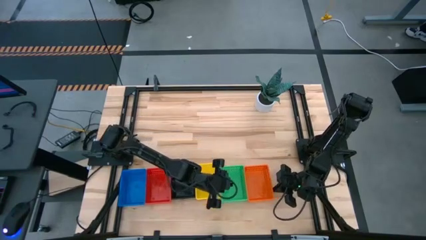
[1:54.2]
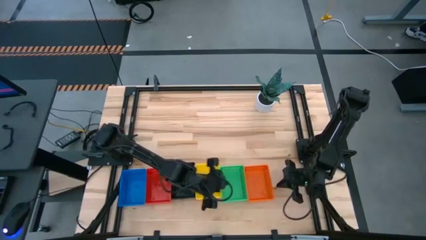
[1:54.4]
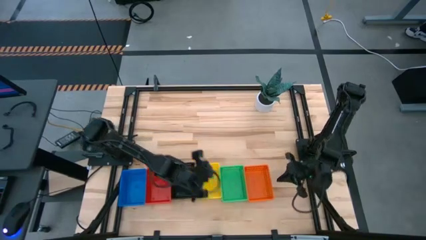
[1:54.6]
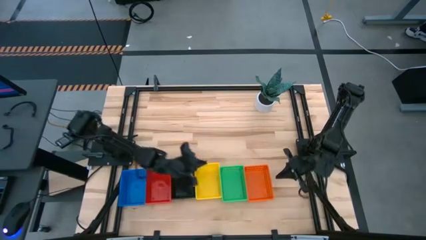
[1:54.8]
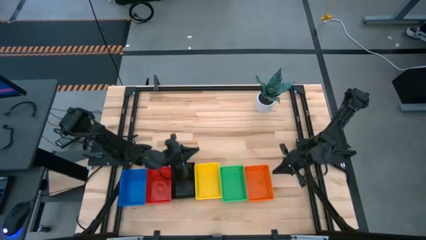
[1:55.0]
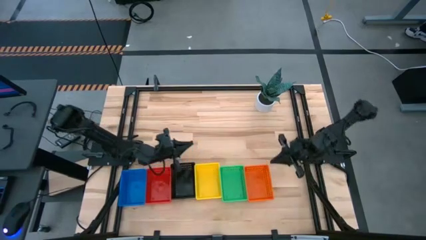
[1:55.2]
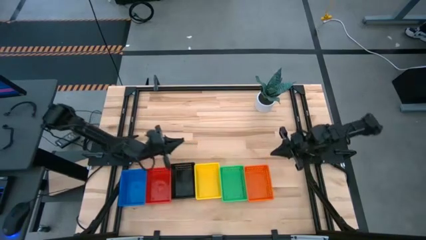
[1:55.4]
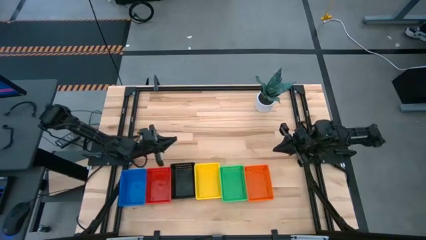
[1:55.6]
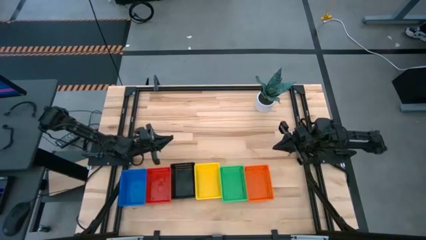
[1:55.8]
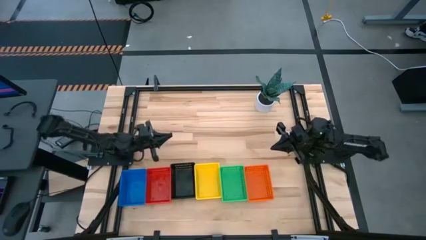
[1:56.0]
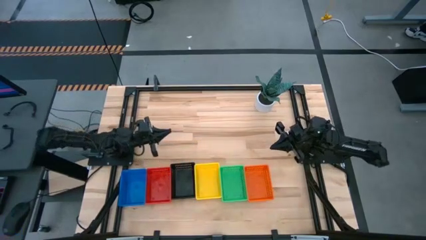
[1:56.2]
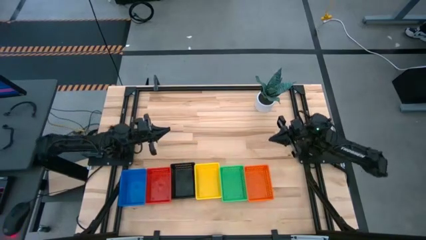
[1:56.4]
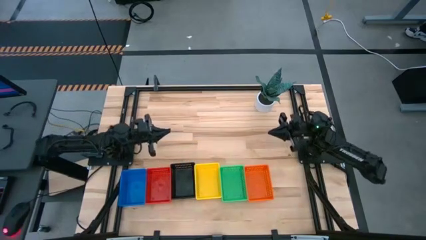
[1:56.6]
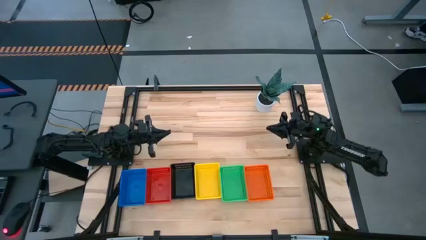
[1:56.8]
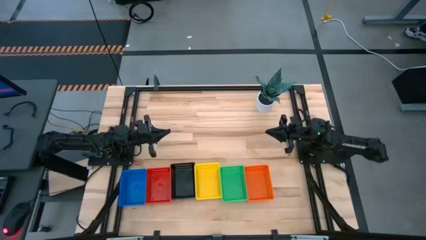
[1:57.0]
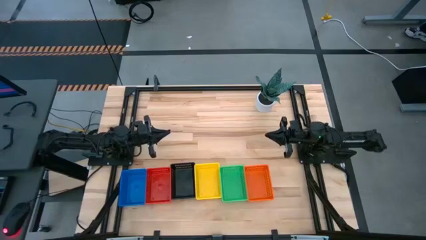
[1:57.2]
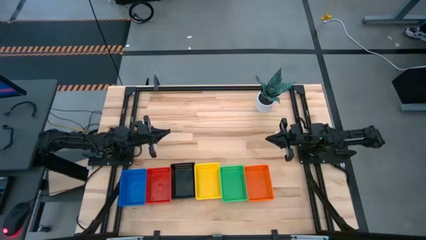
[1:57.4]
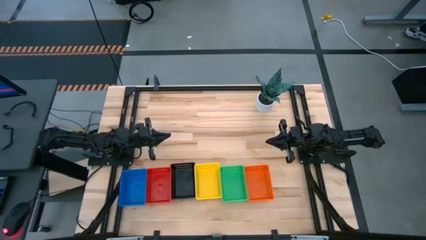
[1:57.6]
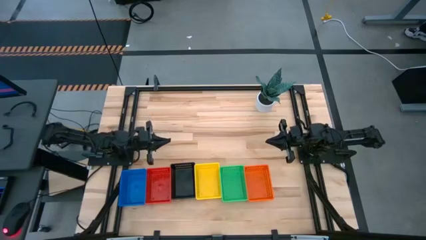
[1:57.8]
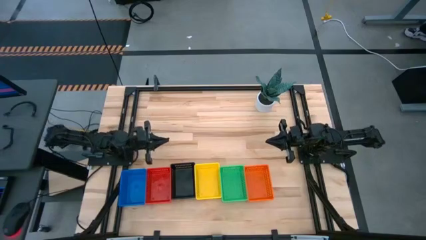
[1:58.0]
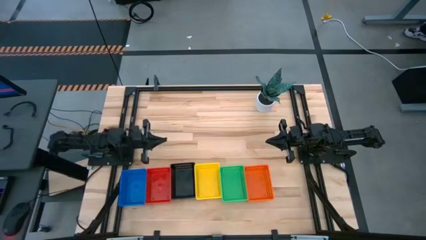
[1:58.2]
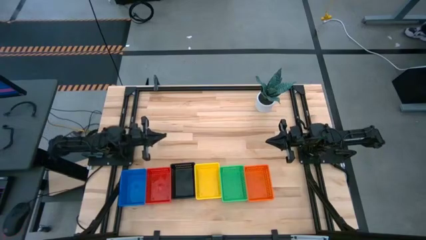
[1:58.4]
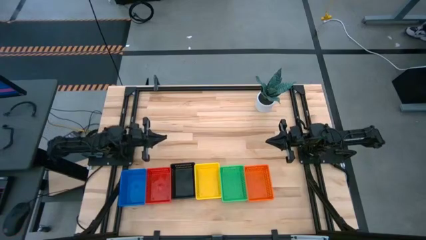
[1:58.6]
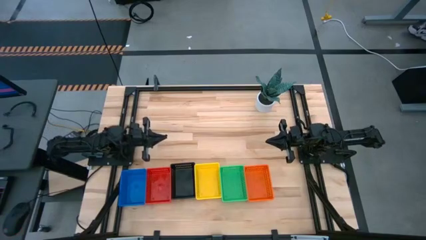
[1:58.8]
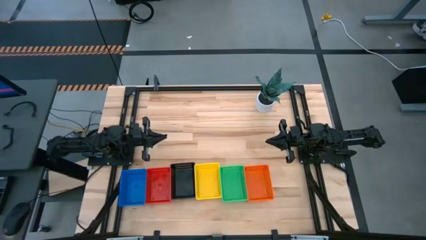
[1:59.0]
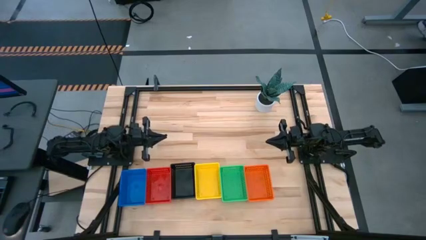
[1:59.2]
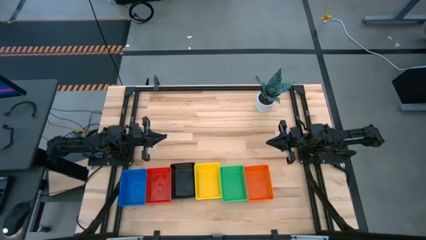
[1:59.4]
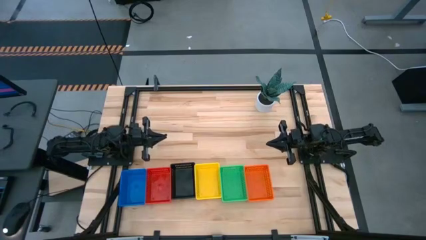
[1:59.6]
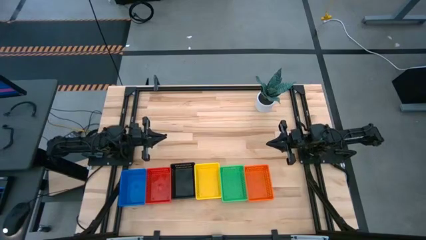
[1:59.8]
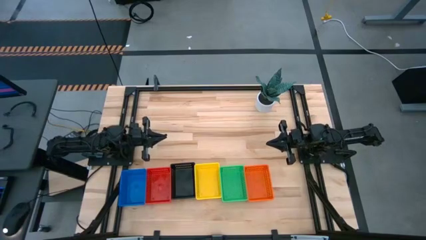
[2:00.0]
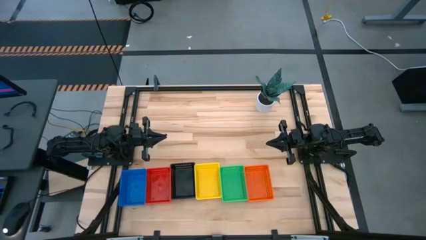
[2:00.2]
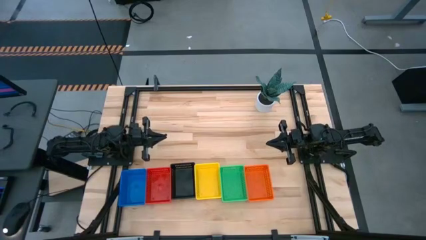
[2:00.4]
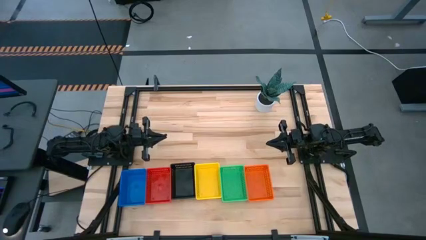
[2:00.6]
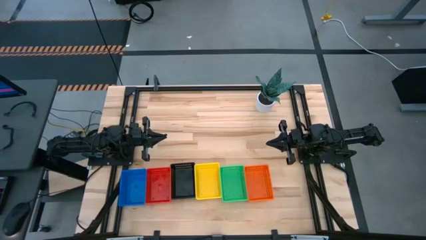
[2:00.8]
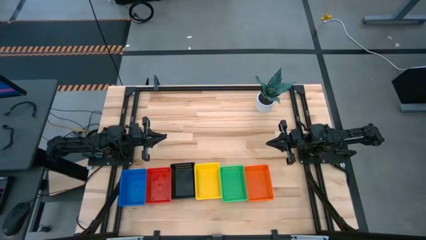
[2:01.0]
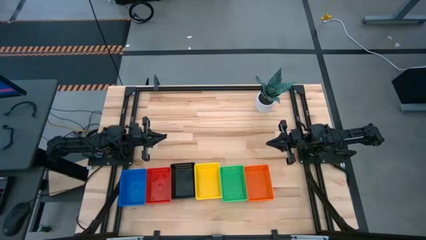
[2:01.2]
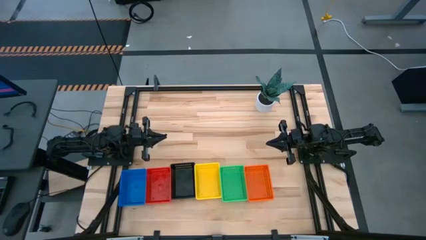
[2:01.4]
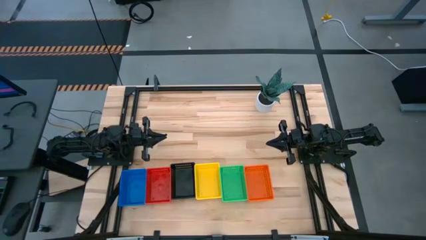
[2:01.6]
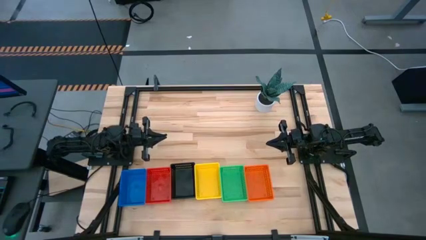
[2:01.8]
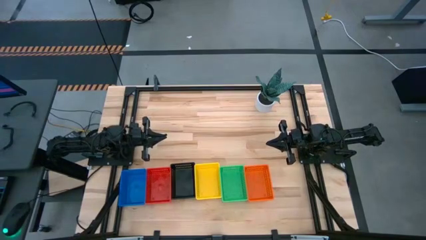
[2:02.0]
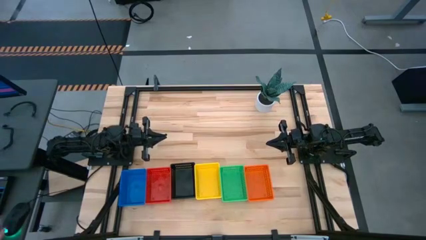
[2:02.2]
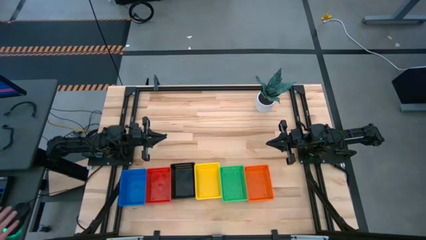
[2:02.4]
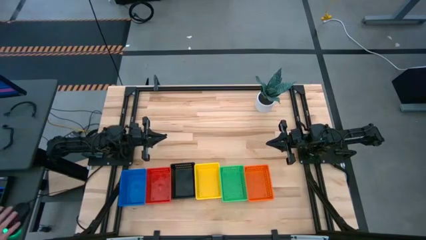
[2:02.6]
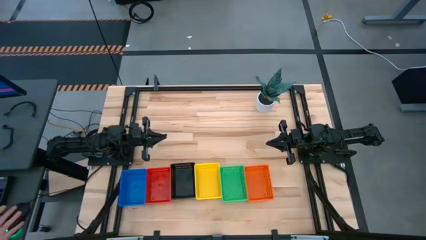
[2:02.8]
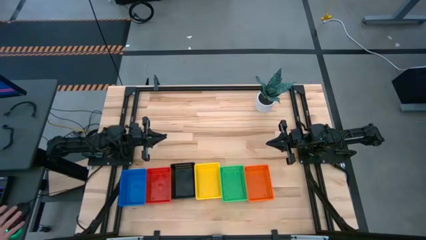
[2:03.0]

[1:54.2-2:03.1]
Return to Home Position
